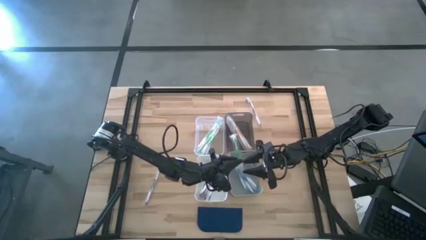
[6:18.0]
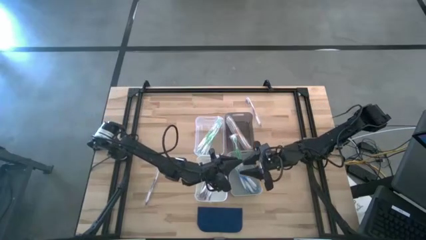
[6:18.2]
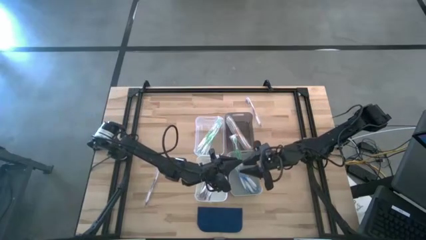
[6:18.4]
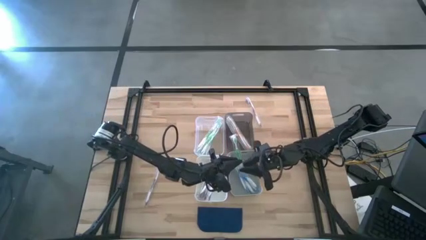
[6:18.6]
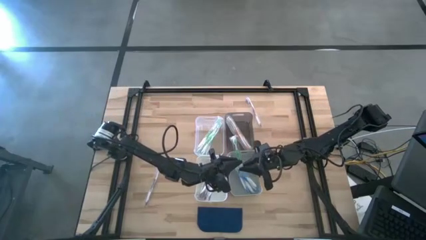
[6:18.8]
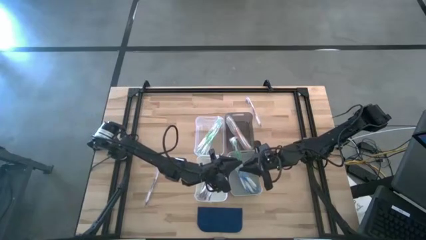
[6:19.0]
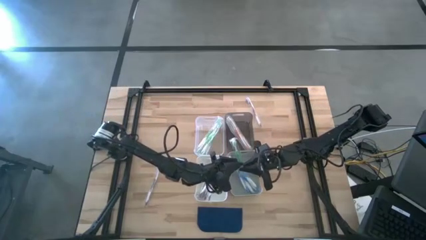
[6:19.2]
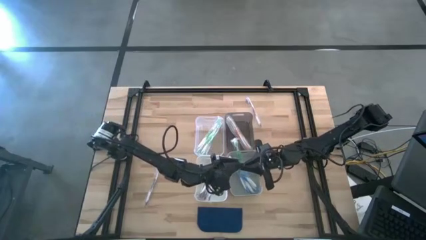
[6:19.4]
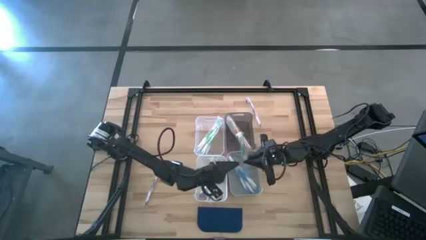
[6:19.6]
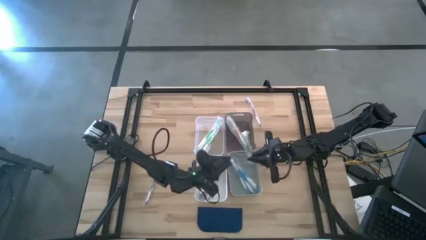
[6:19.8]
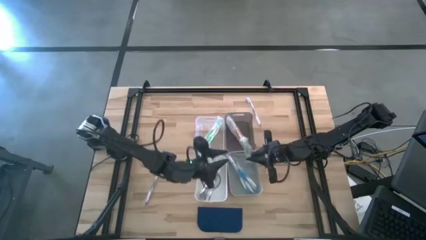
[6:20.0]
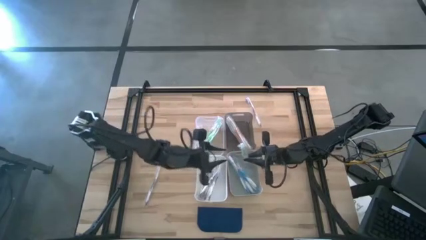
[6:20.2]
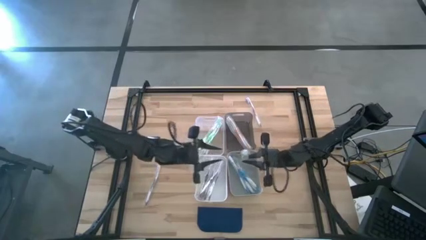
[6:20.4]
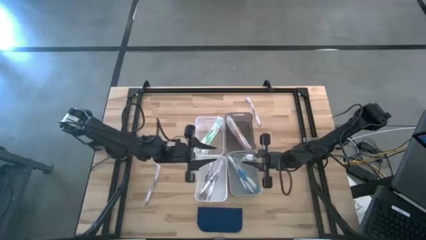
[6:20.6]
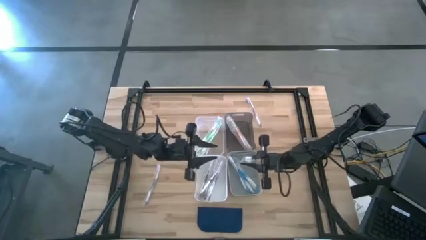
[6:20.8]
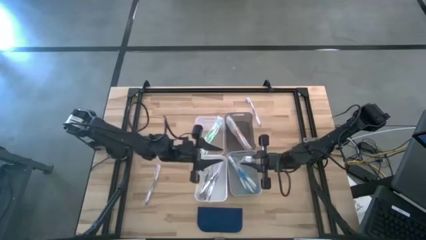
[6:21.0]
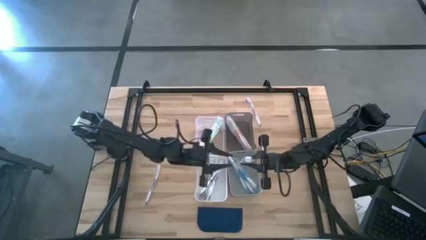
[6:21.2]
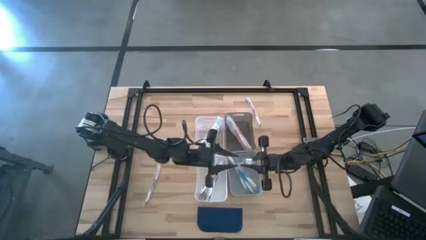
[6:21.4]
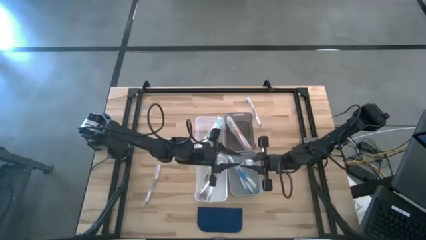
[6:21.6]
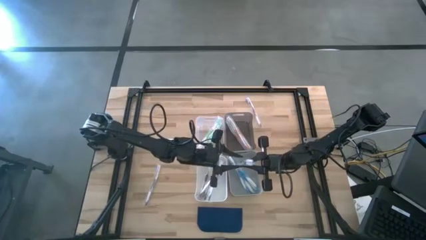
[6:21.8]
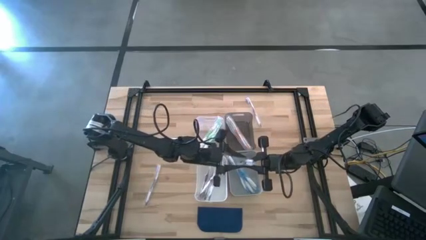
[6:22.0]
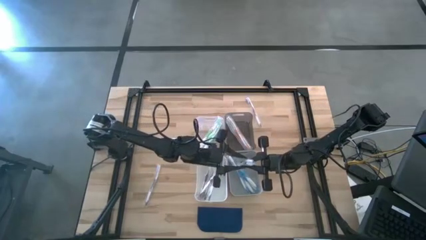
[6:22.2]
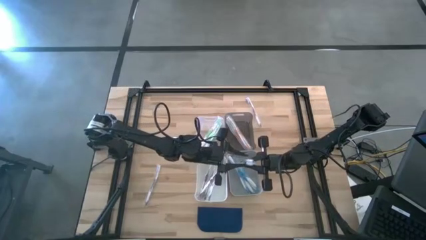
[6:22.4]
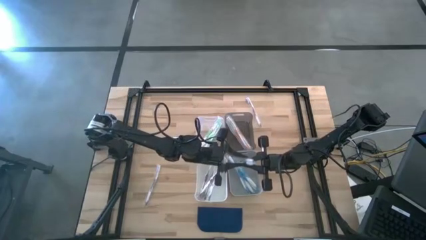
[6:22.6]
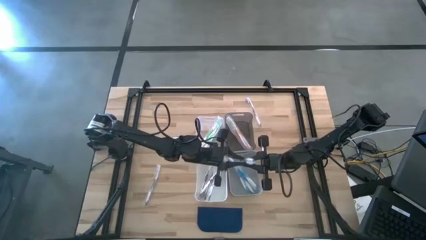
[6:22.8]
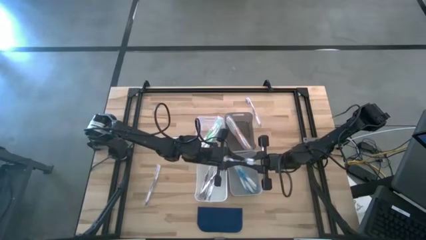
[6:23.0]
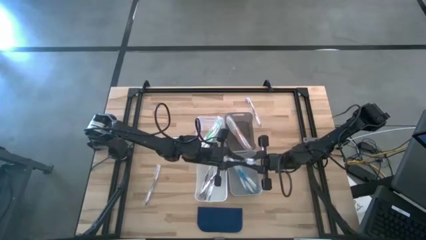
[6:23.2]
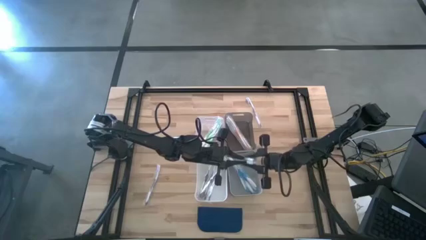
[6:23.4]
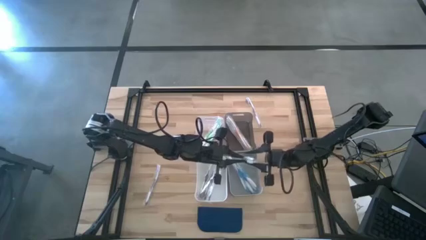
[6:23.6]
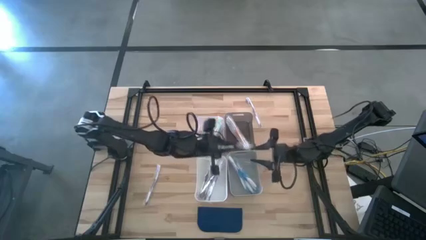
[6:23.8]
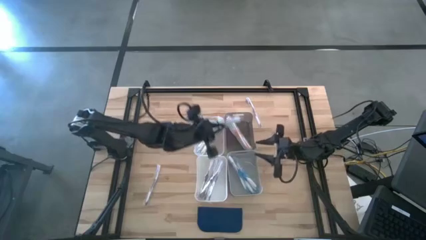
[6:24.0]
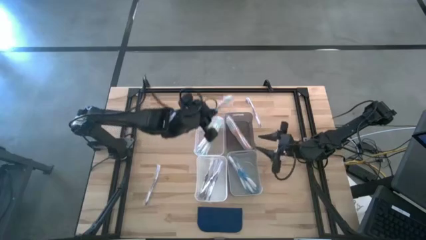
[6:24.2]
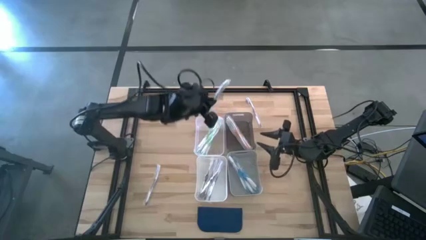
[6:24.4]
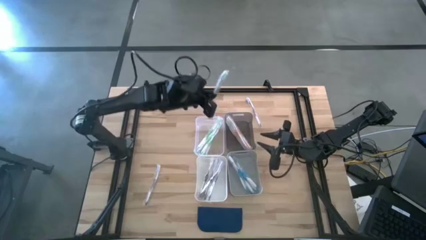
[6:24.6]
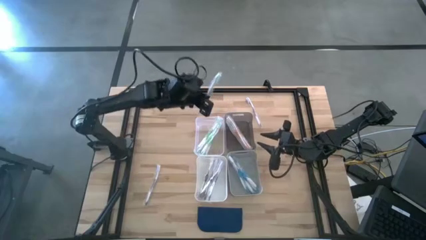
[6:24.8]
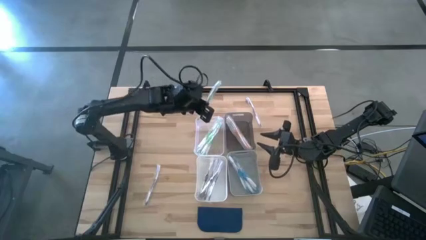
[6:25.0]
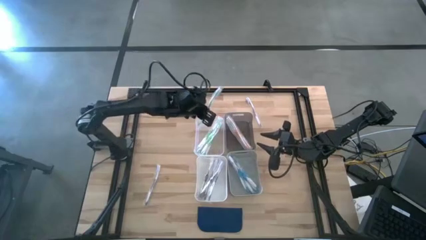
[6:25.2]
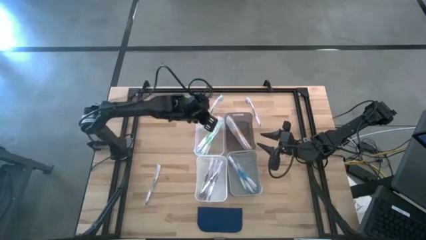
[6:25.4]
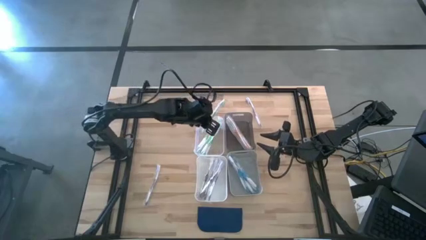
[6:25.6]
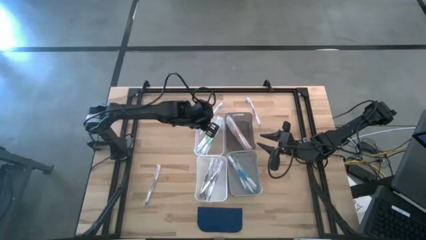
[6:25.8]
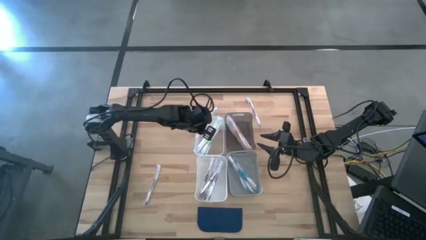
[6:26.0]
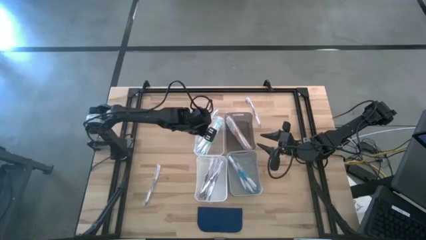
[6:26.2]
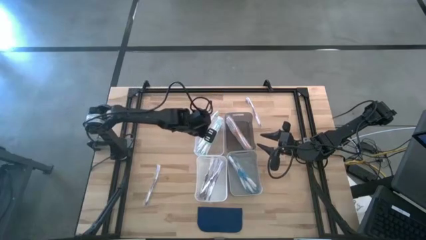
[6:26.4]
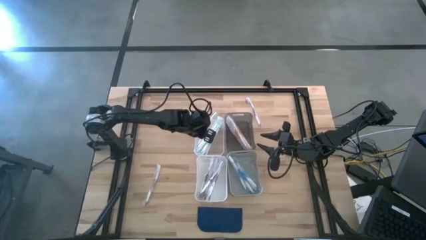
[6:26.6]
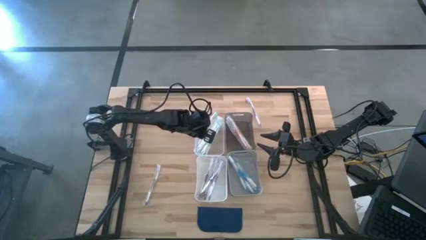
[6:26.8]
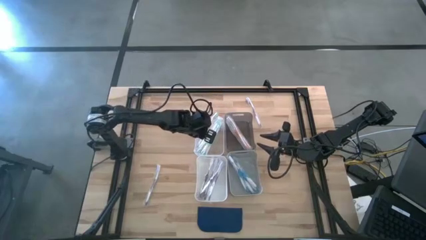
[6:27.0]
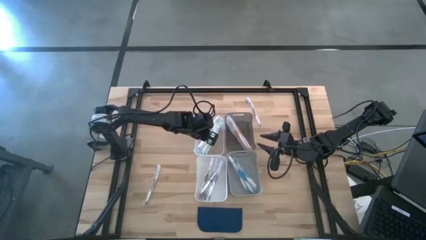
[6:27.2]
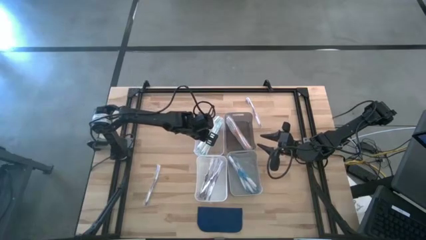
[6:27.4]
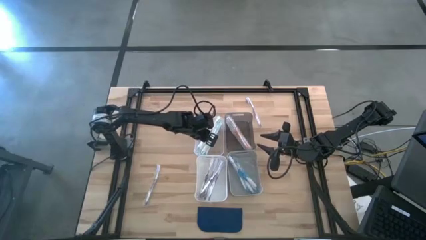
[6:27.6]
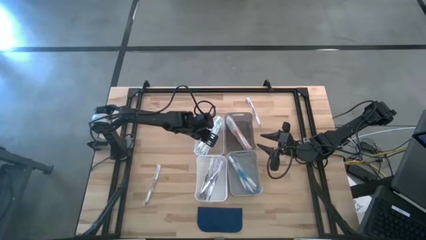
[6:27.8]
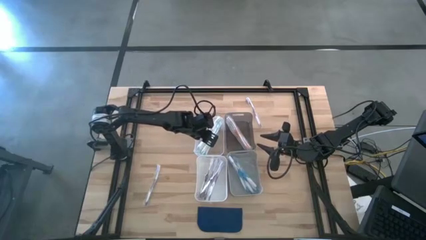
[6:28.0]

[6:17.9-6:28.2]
Task: Pick & Place Toothbrushes
Put the green toothbrush into the transparent bin

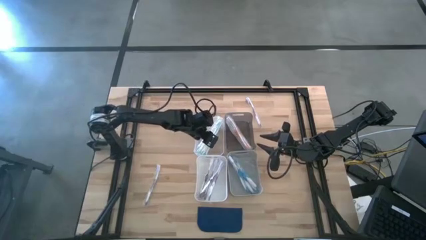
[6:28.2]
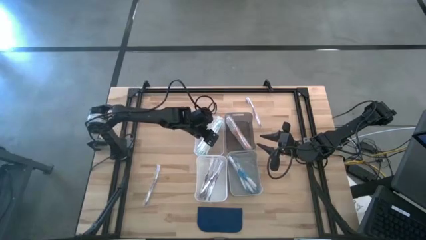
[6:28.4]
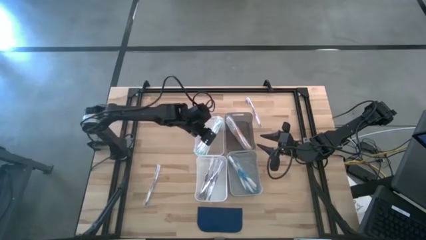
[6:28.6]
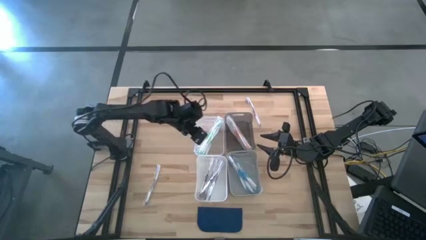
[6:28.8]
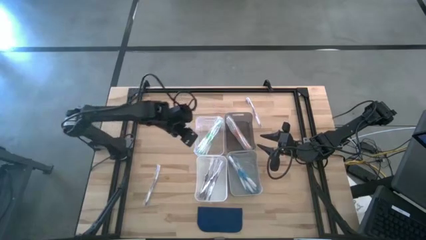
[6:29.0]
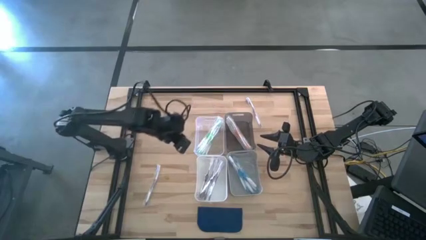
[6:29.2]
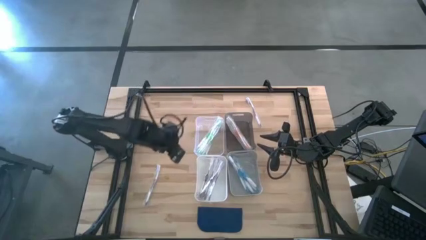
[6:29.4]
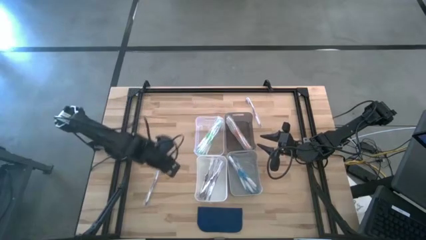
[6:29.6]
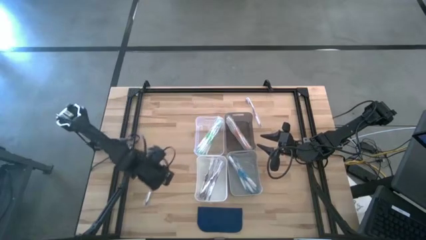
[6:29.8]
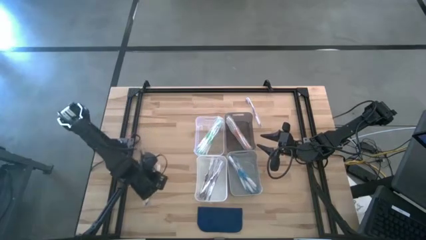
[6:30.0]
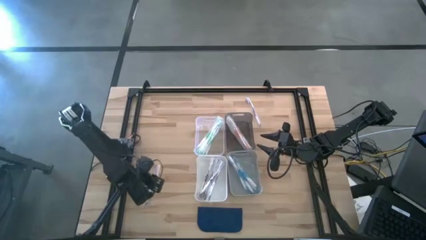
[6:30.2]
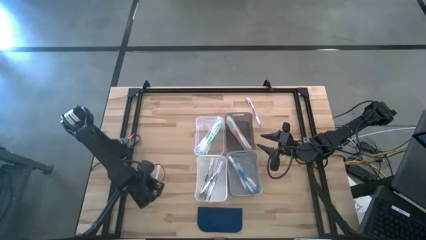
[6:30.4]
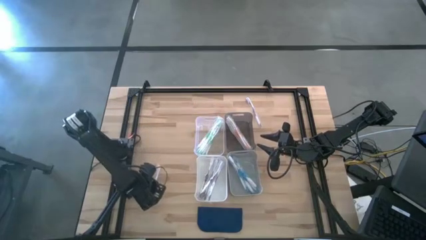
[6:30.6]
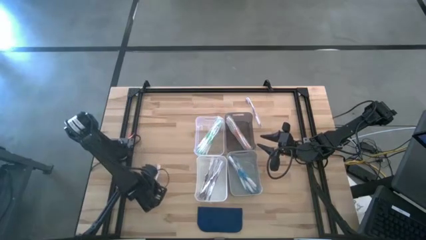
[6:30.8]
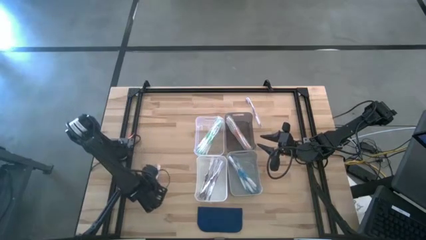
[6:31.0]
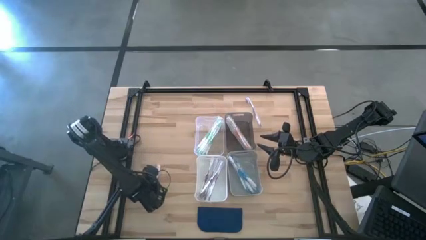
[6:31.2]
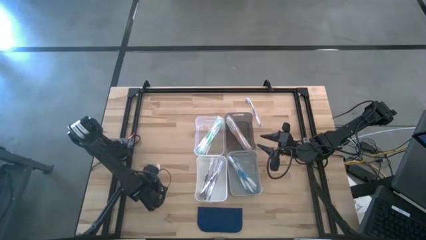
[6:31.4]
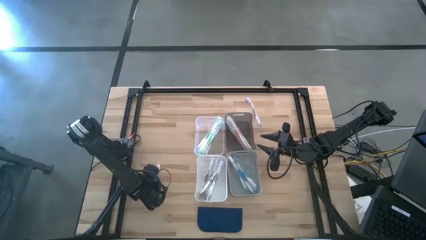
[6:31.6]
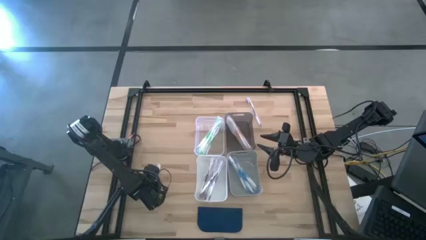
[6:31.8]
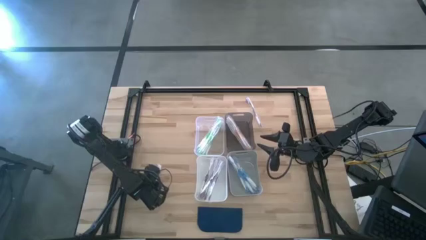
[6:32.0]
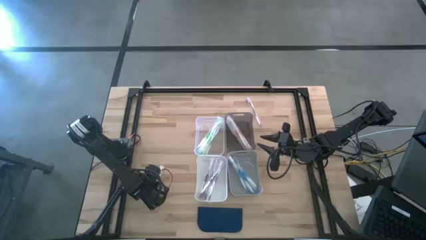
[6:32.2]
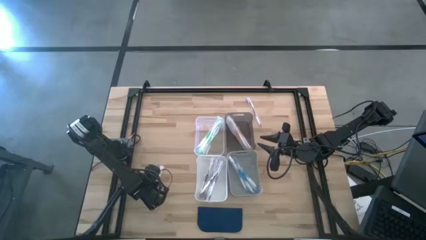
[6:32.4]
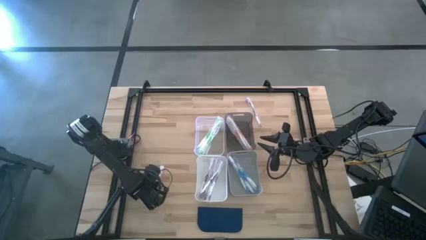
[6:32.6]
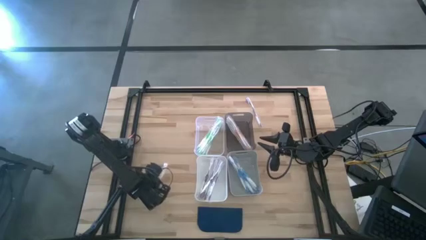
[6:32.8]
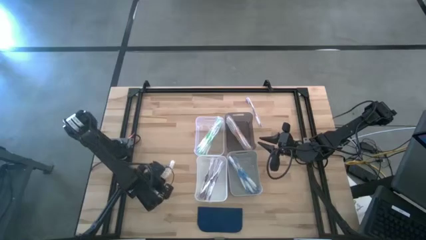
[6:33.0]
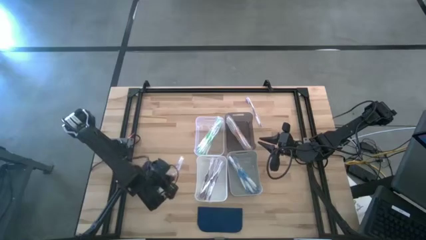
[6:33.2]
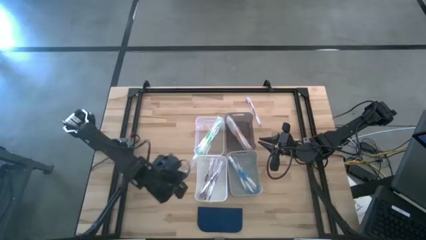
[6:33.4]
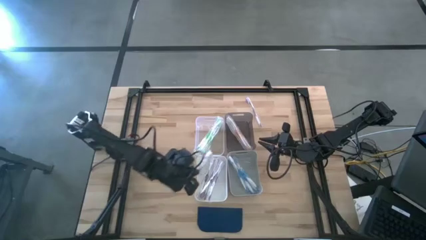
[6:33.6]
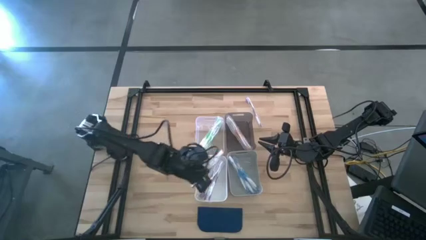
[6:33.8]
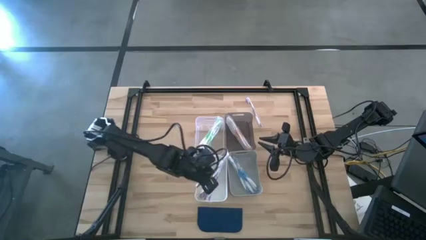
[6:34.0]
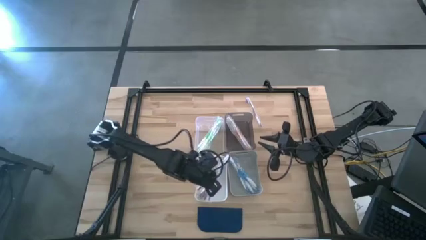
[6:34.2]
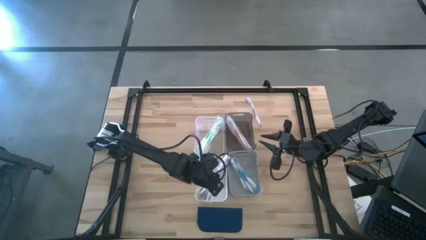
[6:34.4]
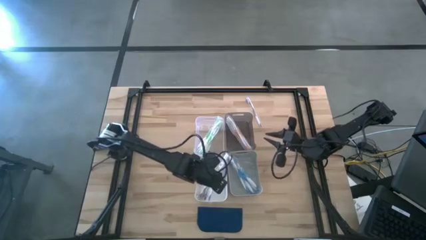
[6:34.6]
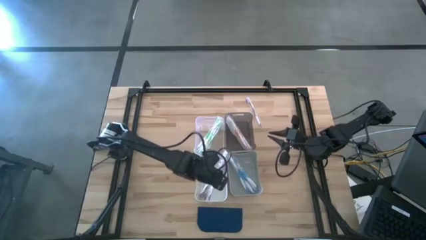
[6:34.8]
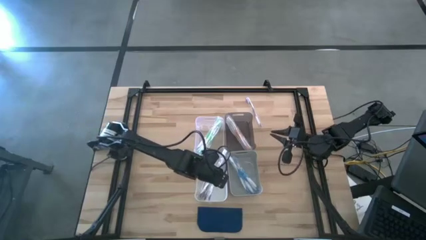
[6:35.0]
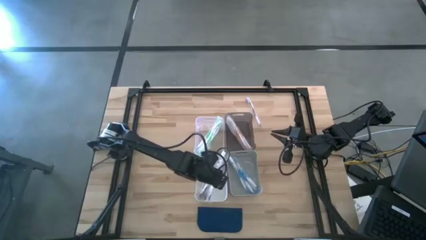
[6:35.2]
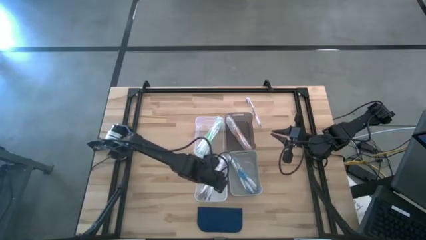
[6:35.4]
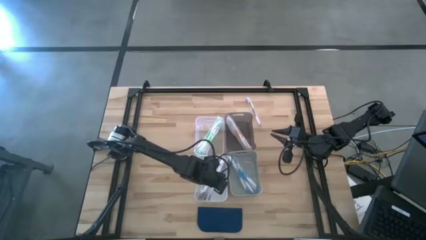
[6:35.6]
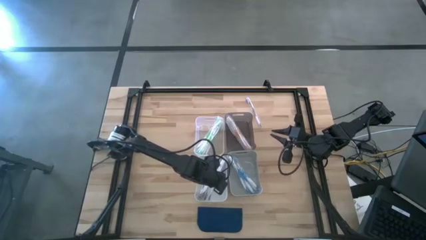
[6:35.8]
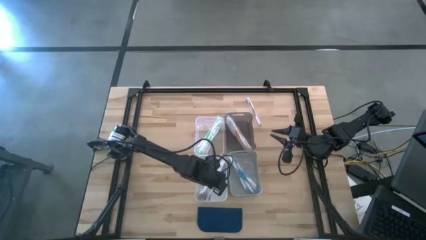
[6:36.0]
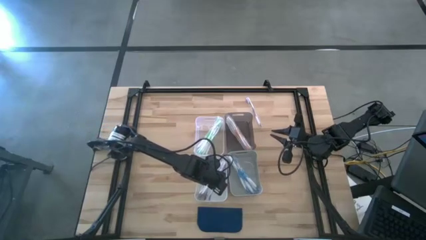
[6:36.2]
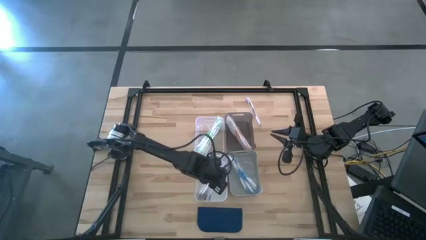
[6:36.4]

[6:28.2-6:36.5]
Put the violet toothbrush into the white bin
